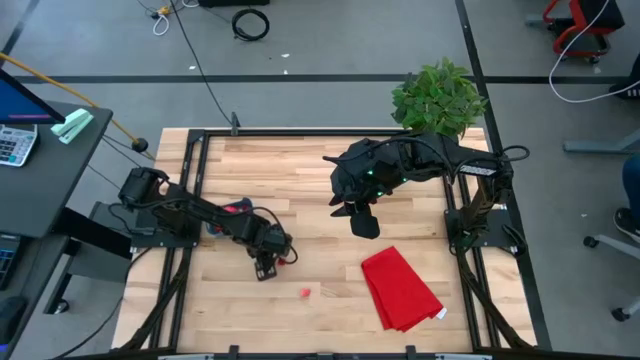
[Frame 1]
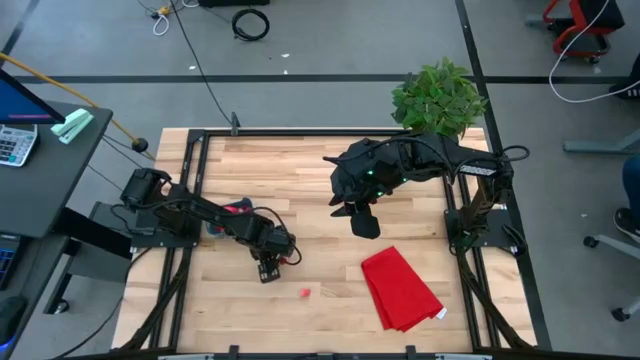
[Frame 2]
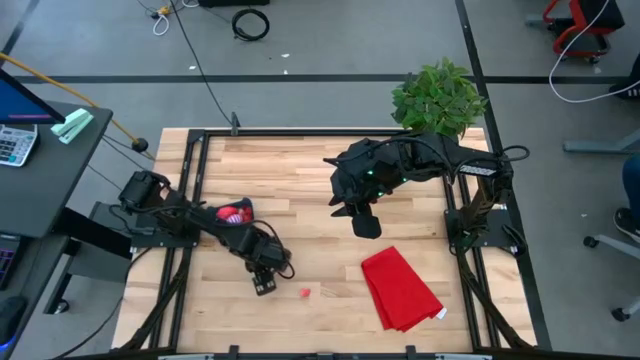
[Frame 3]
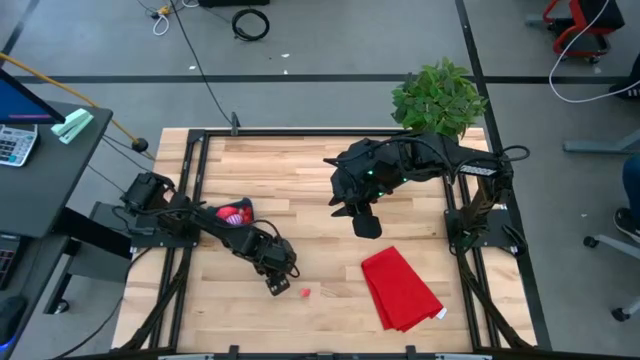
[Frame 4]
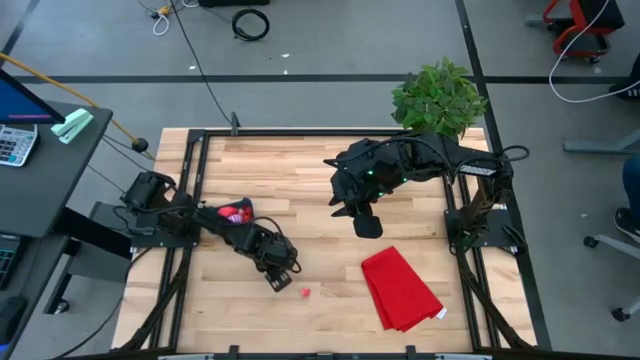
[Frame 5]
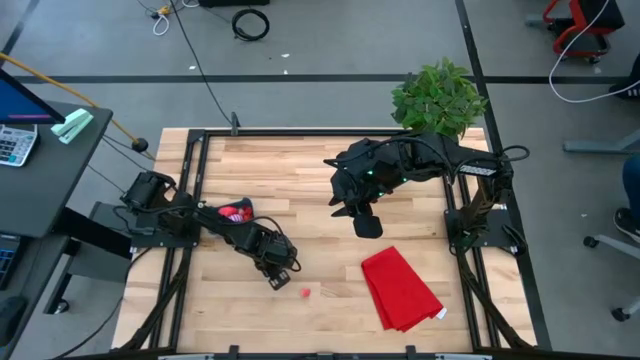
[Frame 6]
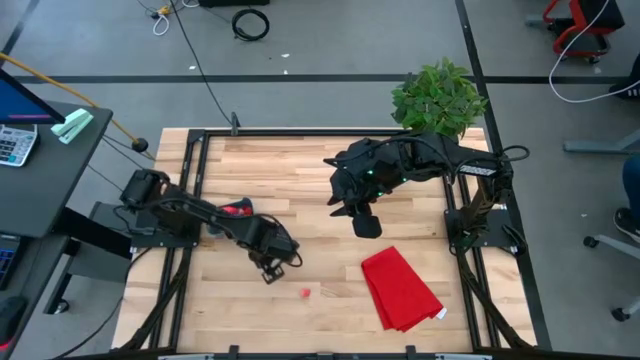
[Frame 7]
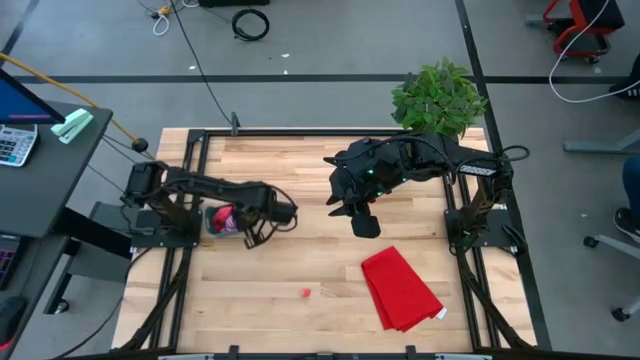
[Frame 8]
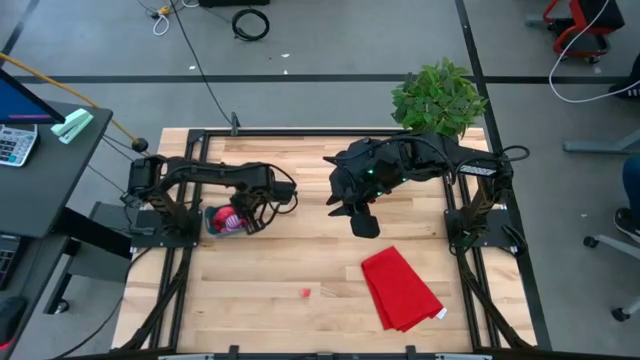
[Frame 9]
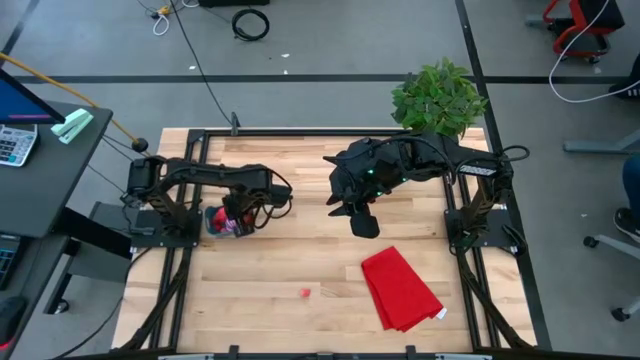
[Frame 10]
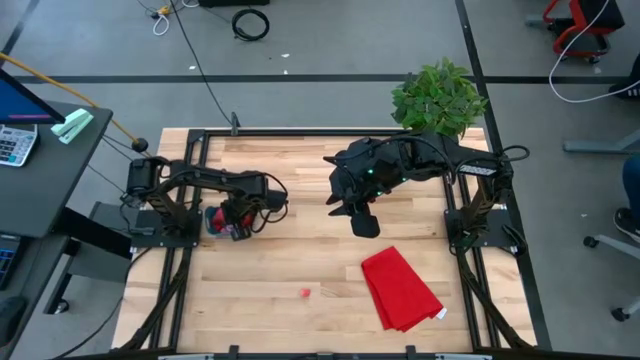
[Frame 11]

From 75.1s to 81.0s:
Task: Pick and placing Produce into tupperware
Put the red cherry into the blue bin

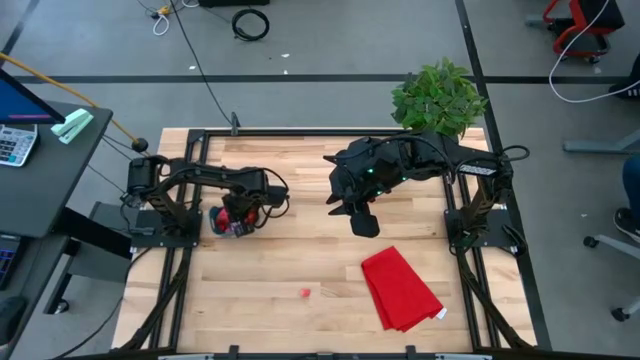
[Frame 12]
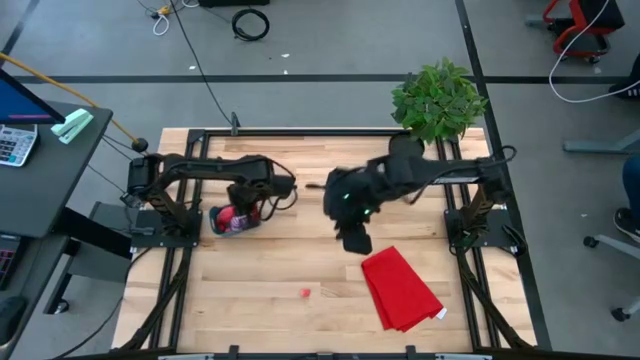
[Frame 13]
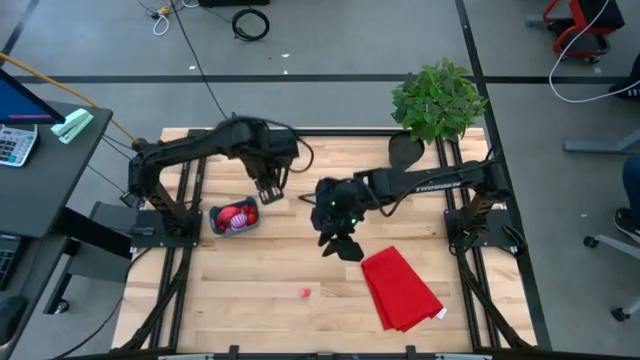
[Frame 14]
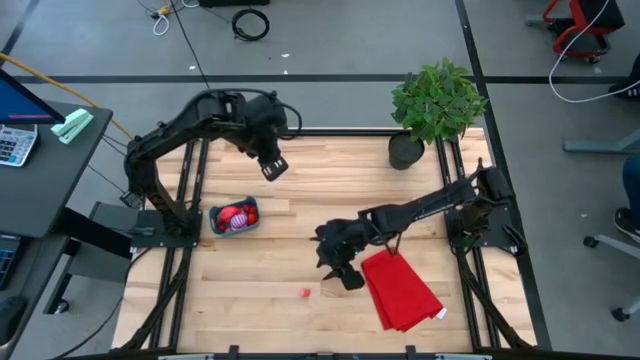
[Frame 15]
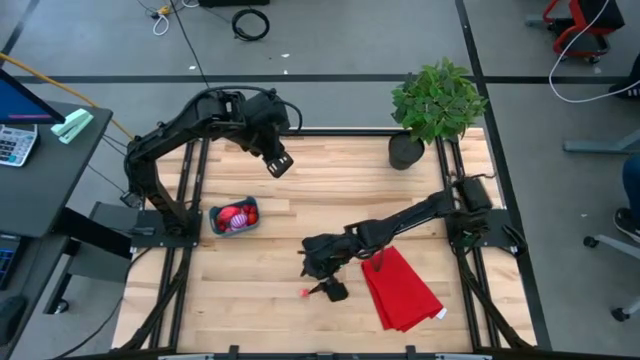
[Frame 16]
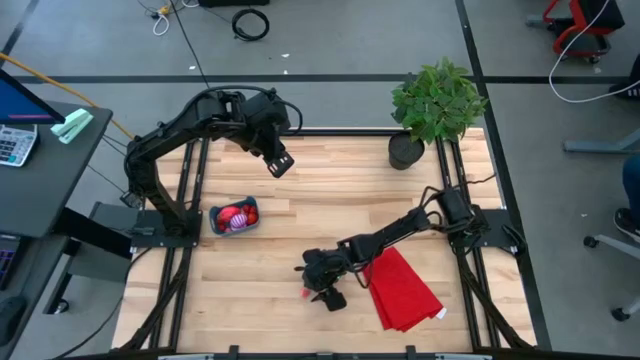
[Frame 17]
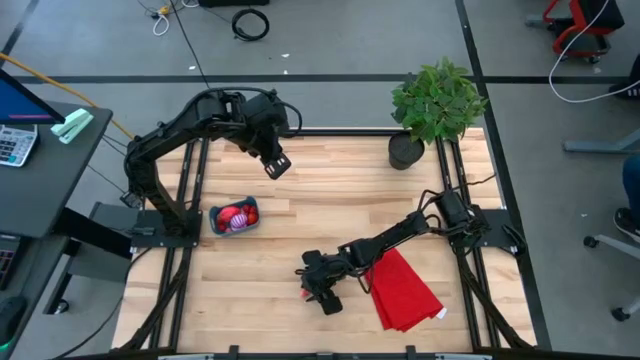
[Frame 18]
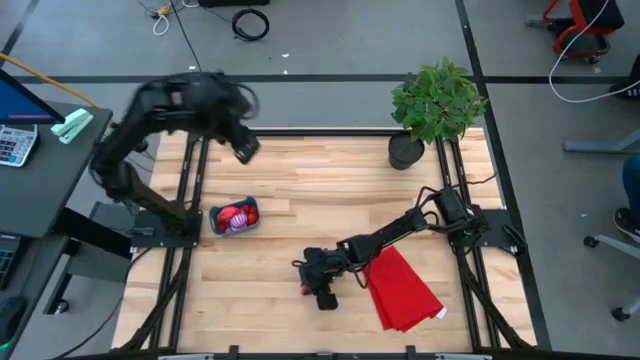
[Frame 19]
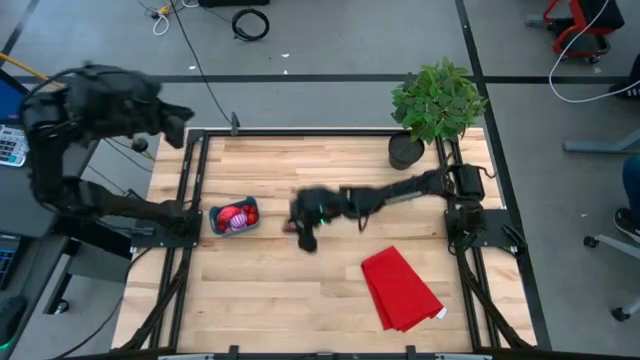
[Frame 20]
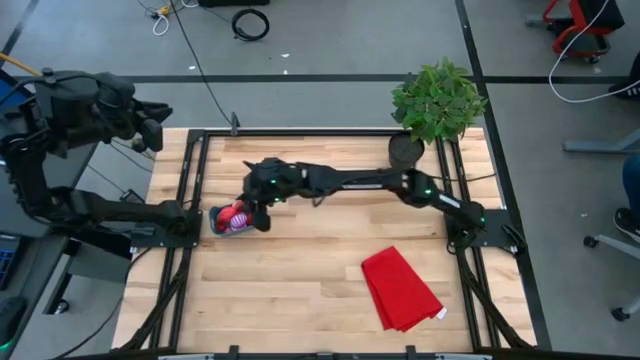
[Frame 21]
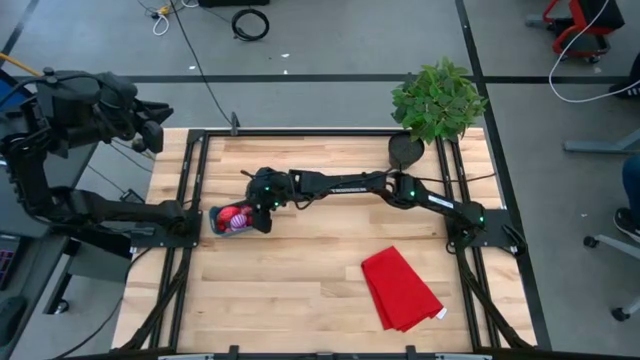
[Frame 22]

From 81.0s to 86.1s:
Put the pink peach into the blue bin

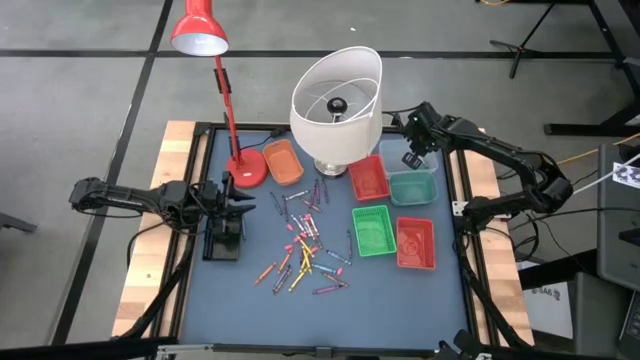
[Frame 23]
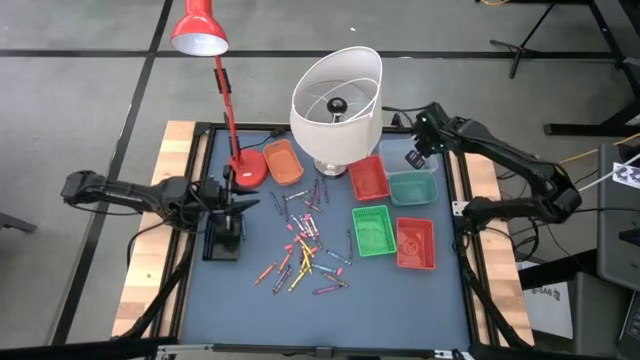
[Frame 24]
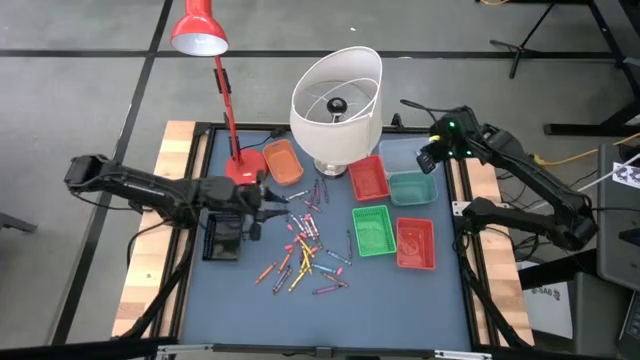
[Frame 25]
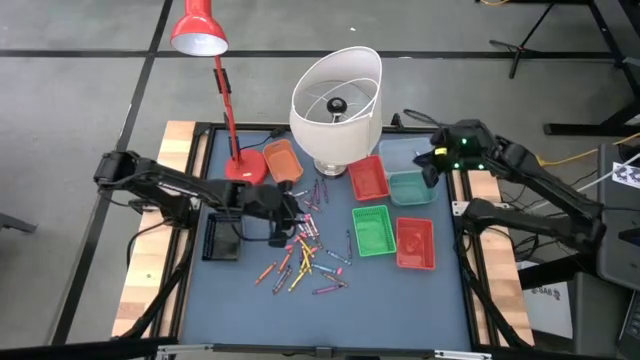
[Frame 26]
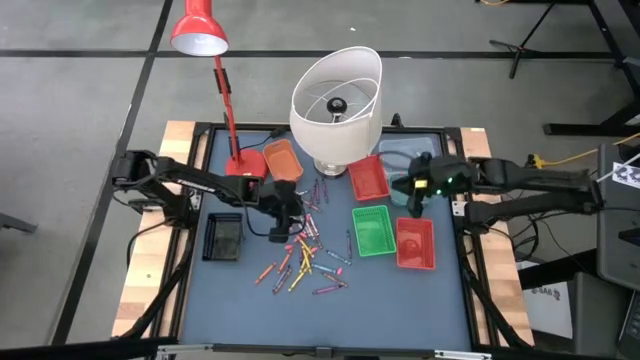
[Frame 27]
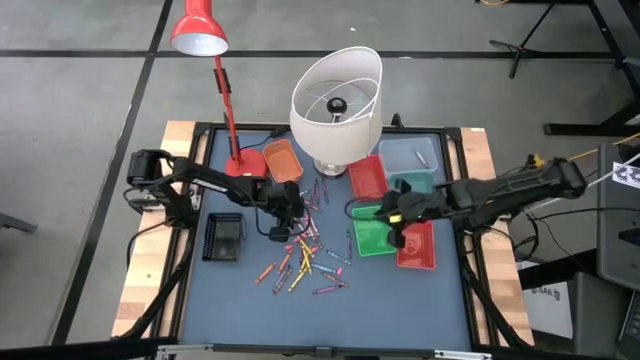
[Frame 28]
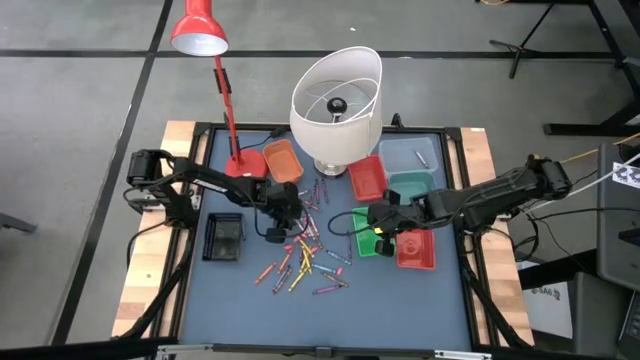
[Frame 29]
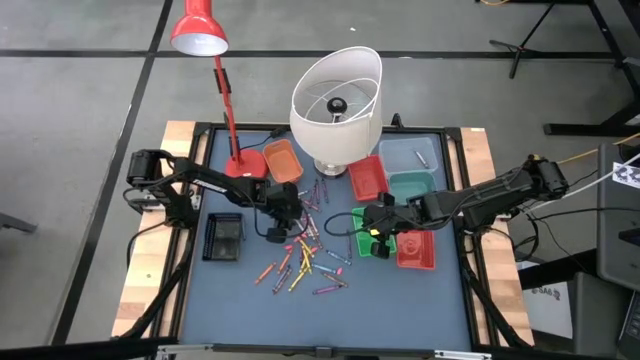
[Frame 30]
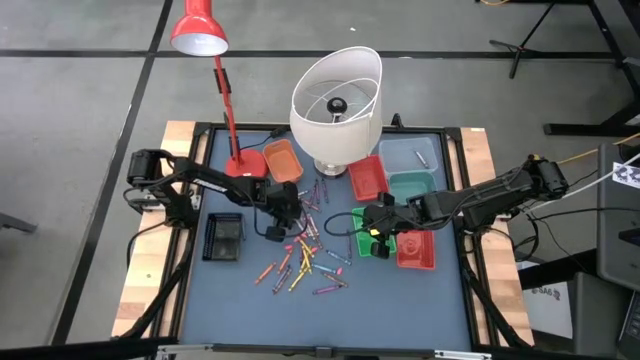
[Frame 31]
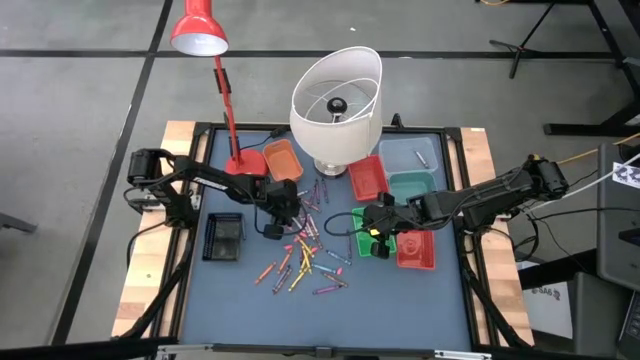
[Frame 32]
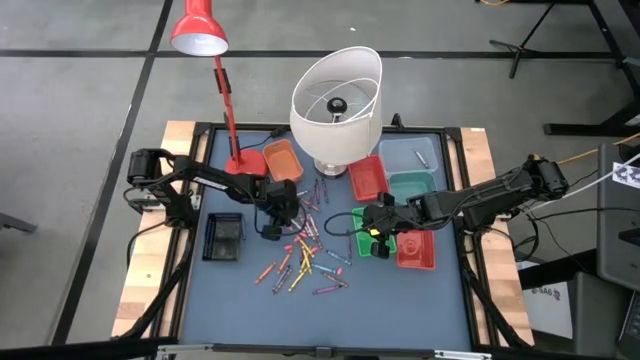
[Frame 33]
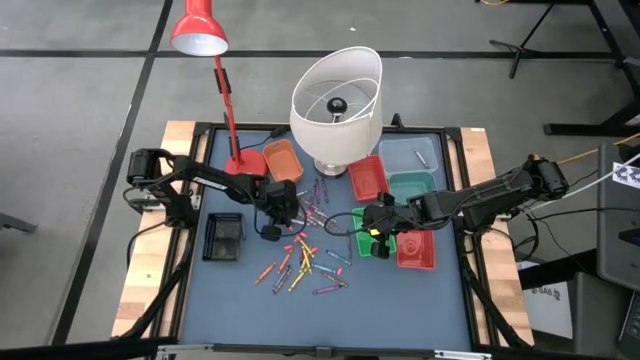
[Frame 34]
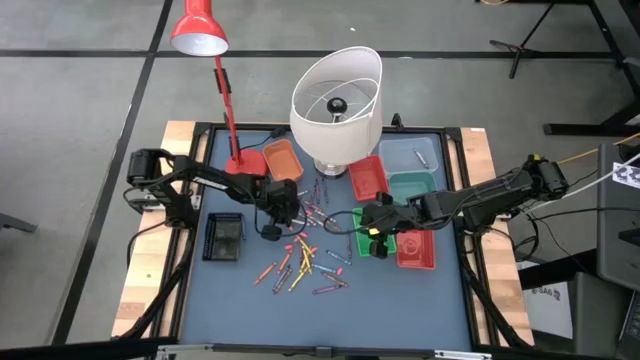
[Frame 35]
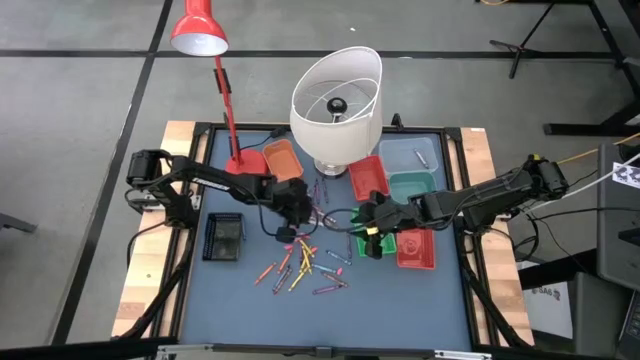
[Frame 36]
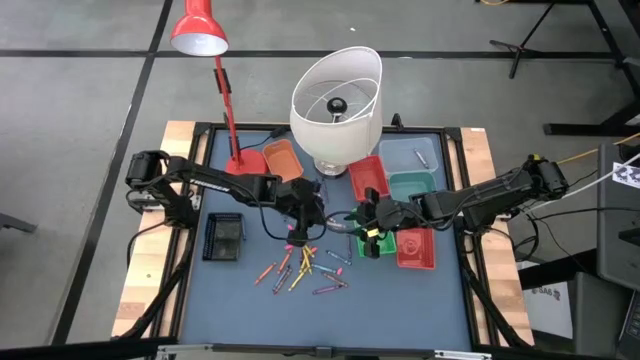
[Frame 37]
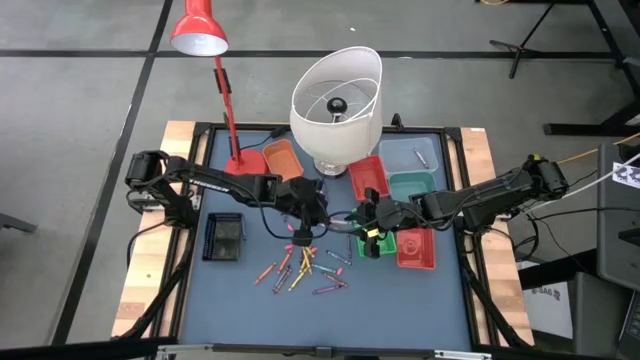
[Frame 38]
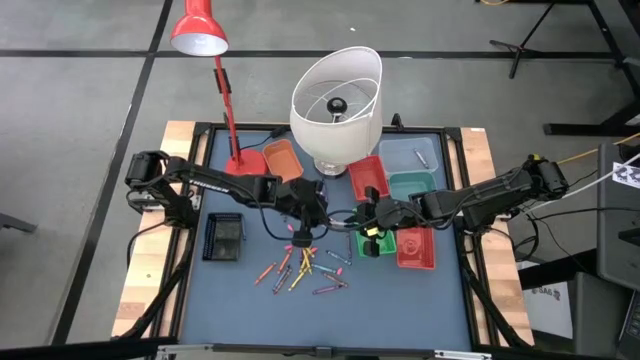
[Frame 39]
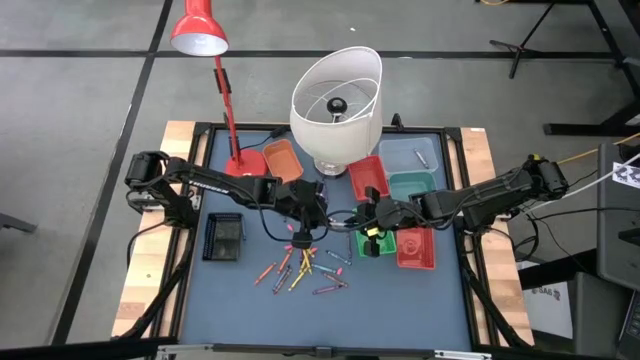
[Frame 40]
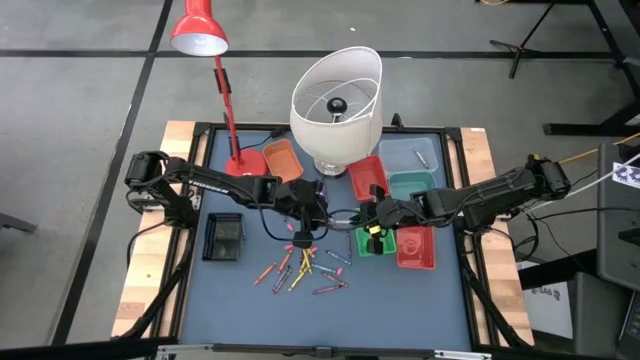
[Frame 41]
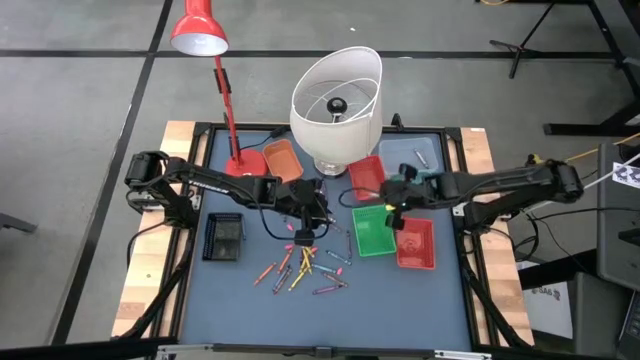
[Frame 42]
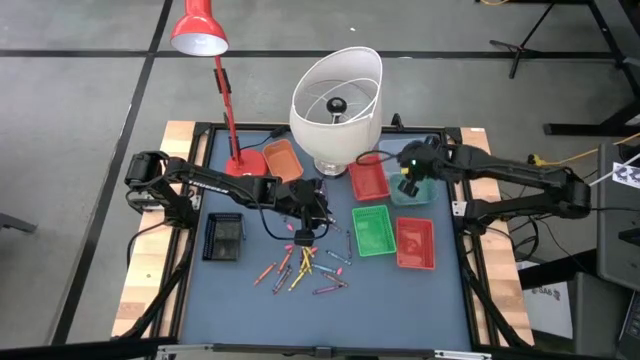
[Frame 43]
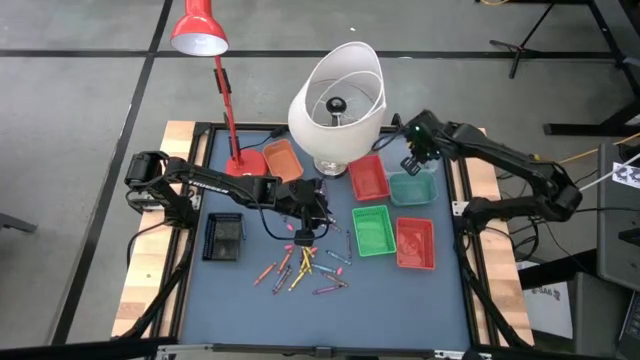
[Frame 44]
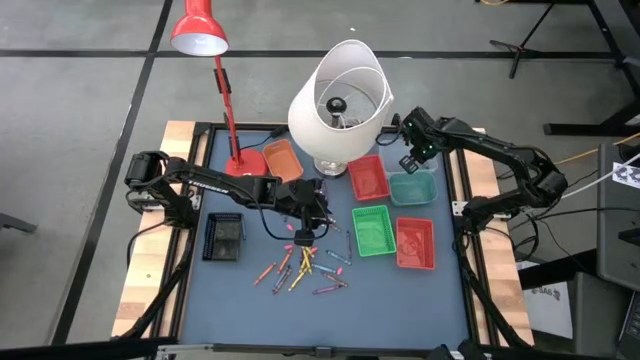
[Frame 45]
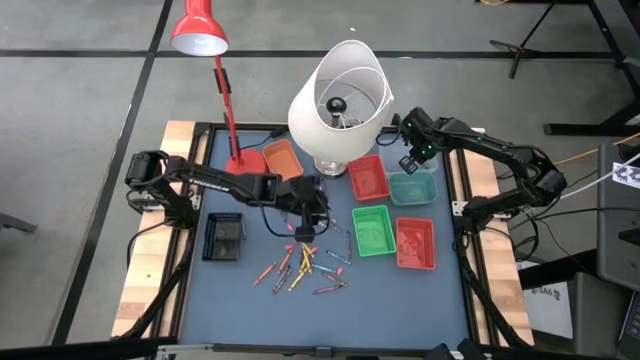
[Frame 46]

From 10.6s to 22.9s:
Task: Sort crayons
Put the gray crayon into the transparent bin
